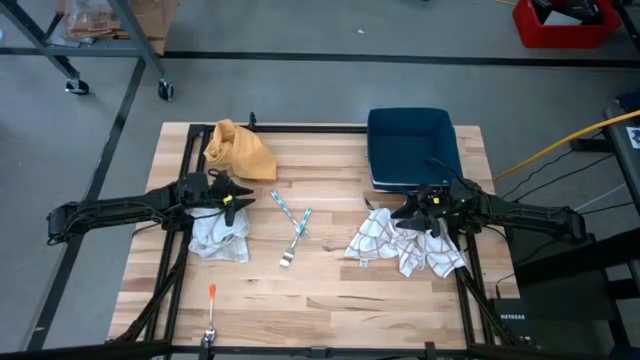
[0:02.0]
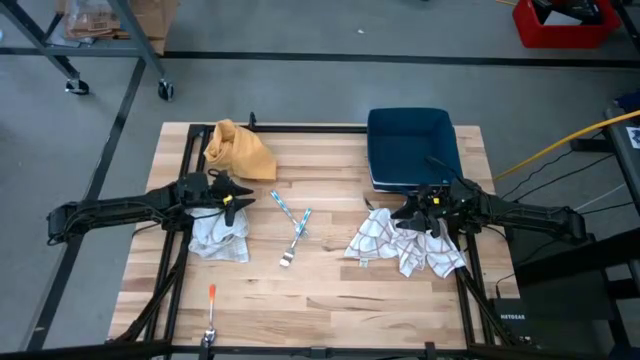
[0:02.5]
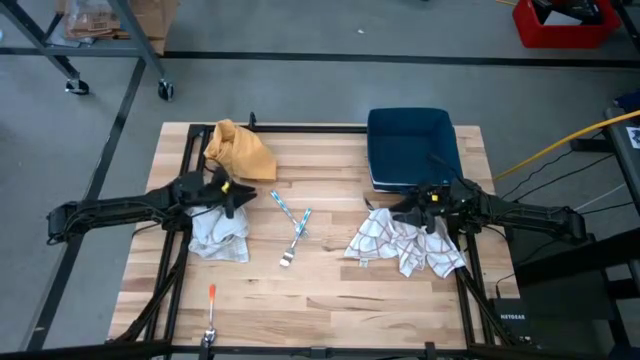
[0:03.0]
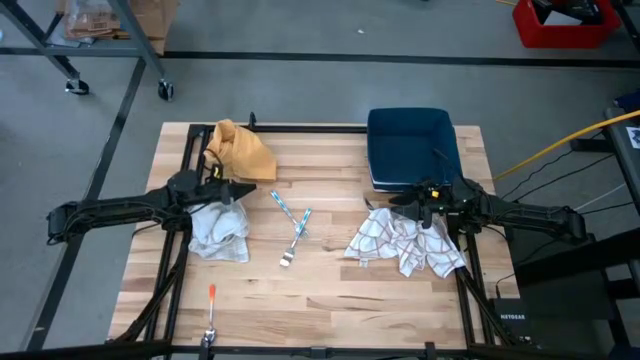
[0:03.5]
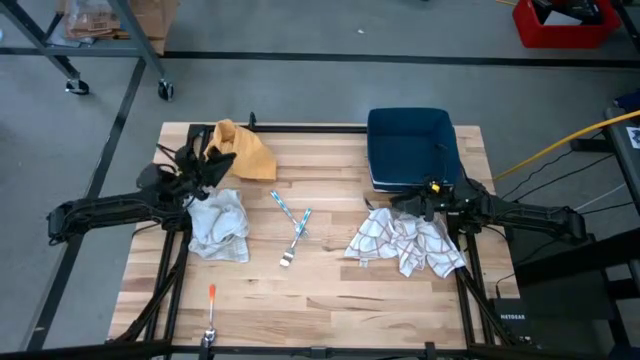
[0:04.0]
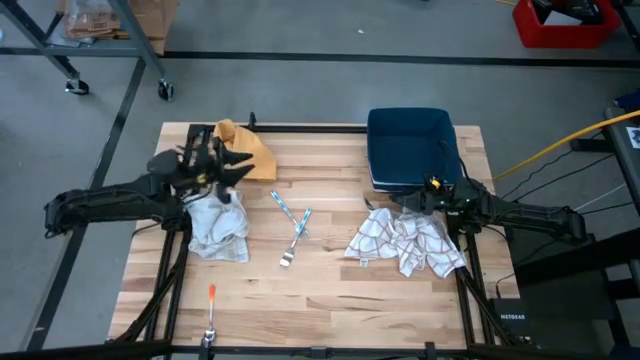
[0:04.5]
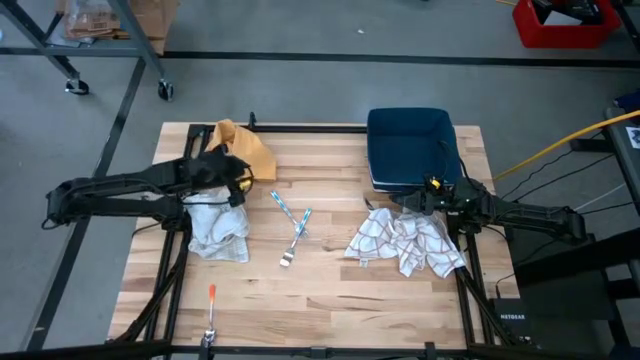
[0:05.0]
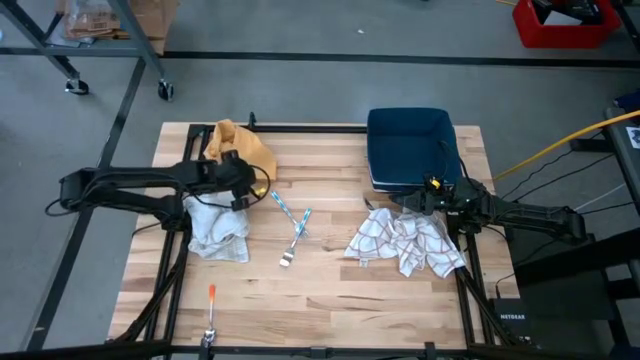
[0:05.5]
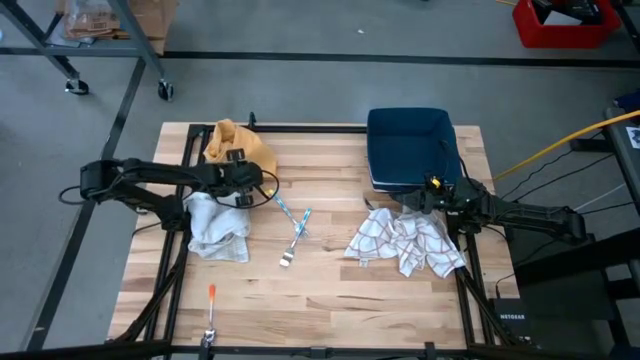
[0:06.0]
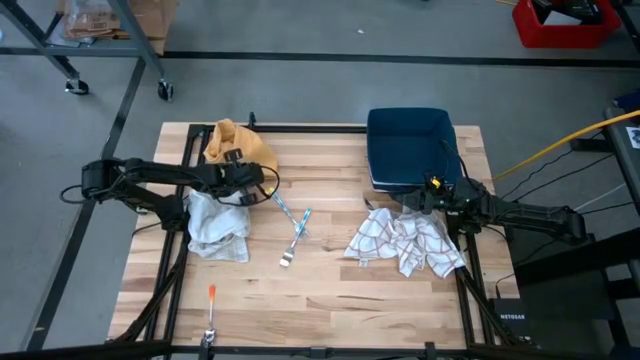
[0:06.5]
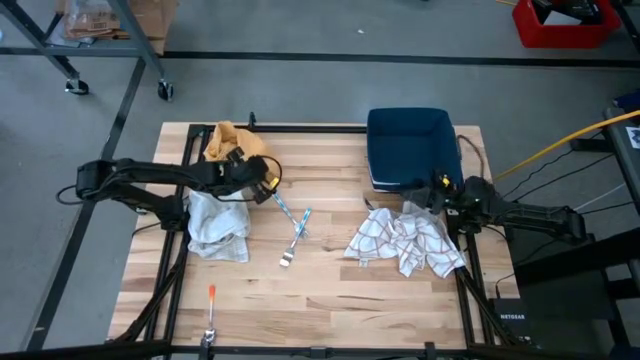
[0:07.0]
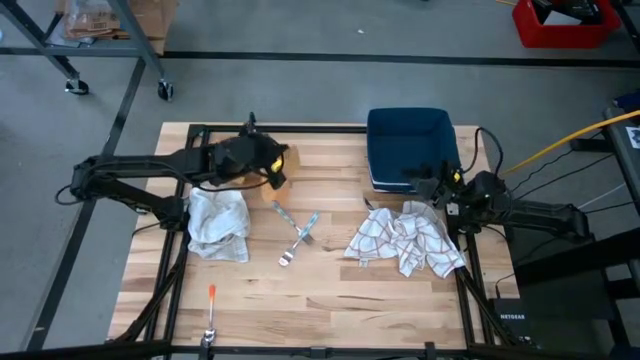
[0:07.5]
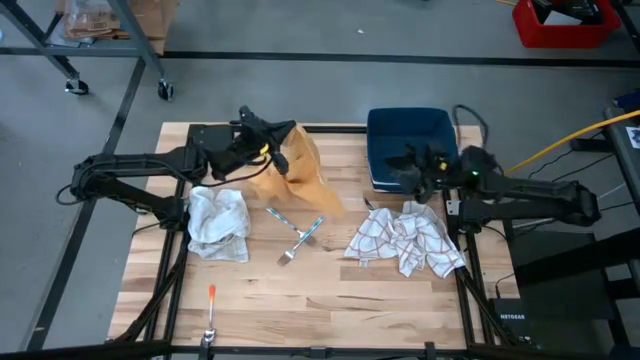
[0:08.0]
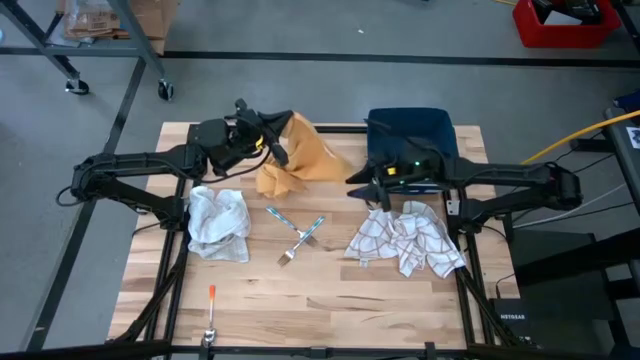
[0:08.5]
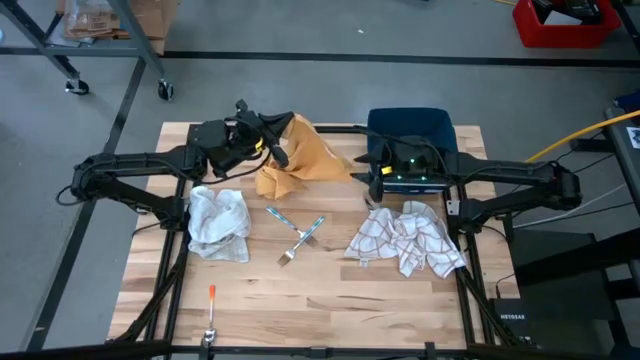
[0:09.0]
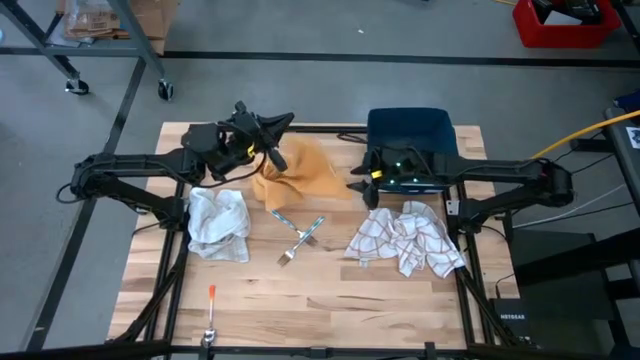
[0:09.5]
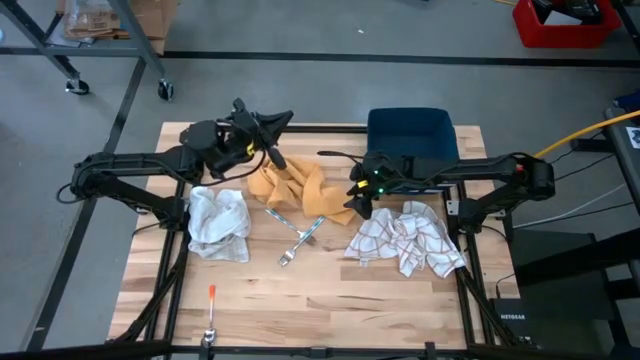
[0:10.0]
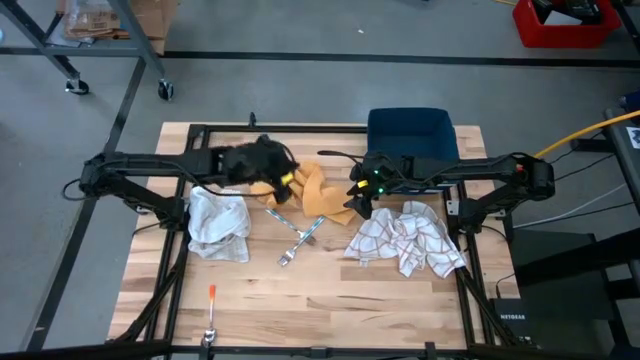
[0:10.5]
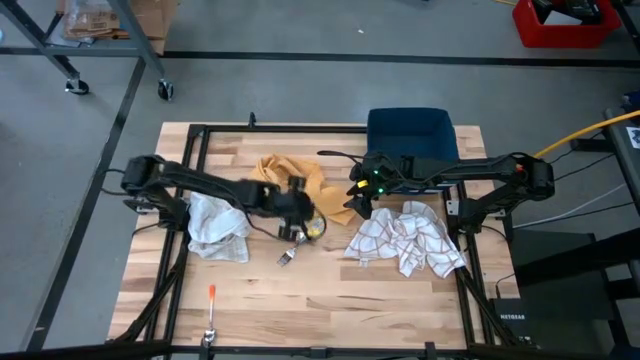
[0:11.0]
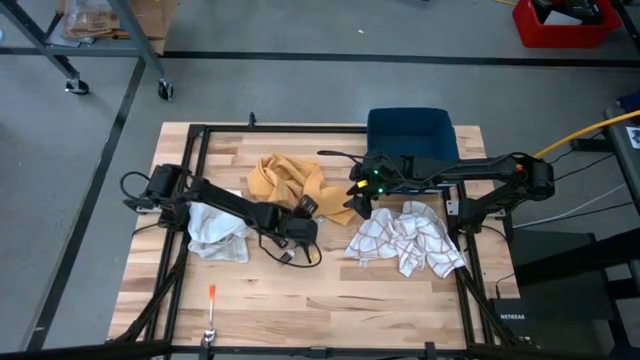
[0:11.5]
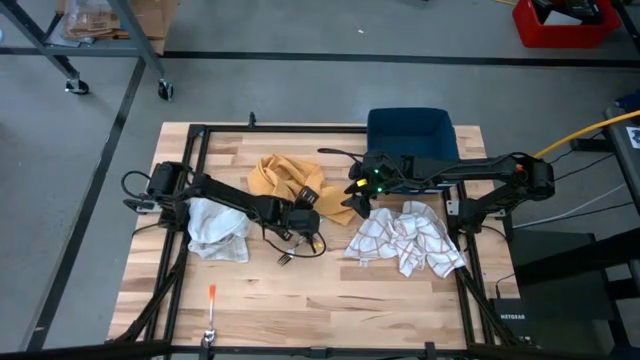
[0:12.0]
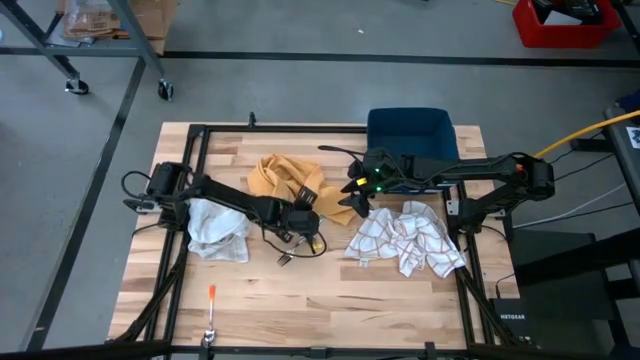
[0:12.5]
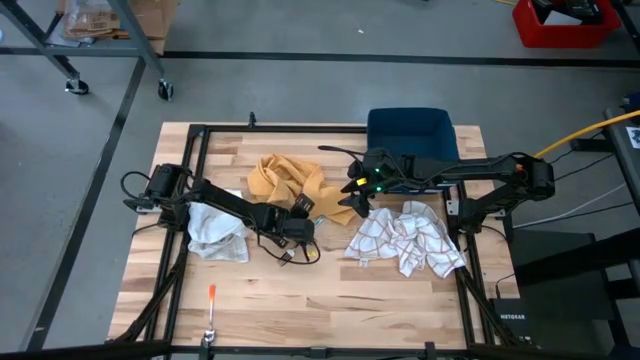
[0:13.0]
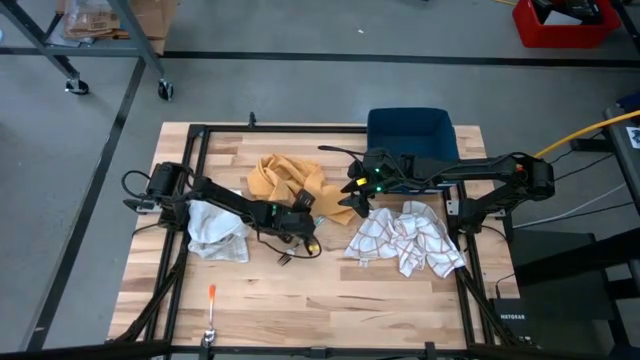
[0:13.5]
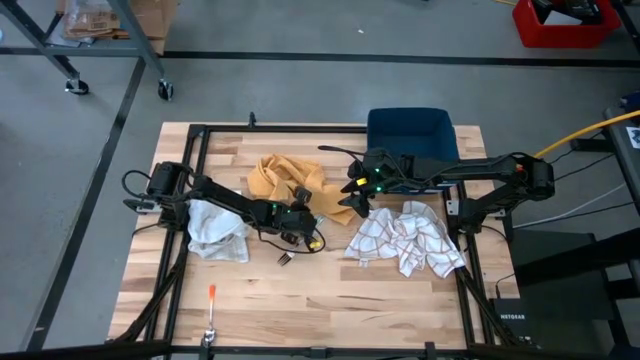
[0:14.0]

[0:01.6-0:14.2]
Task: Fold towel
Fold the yellow towel
